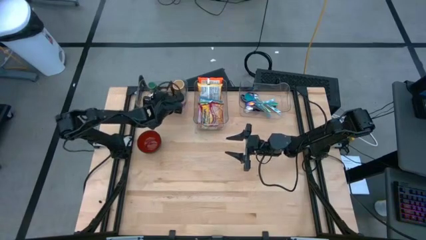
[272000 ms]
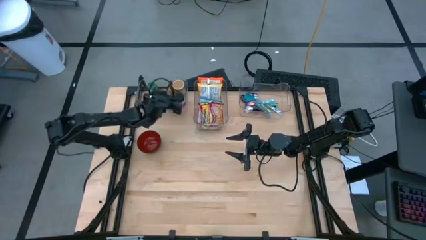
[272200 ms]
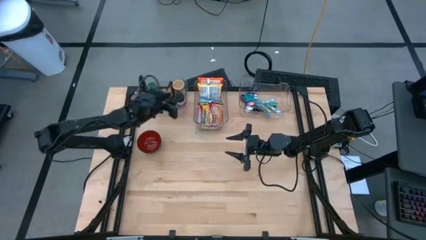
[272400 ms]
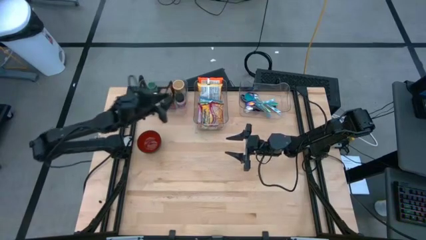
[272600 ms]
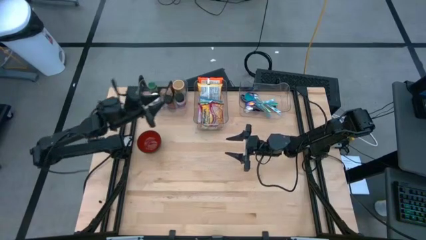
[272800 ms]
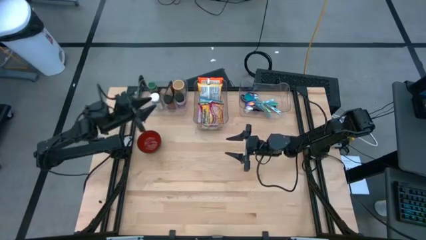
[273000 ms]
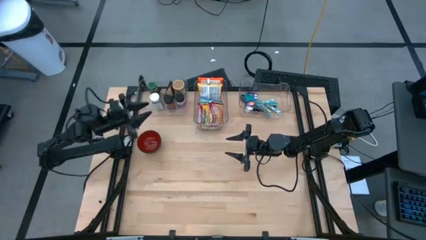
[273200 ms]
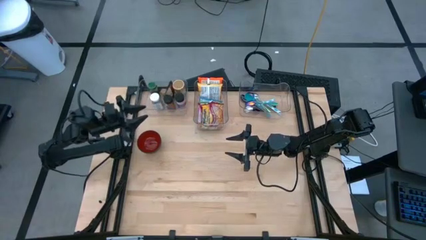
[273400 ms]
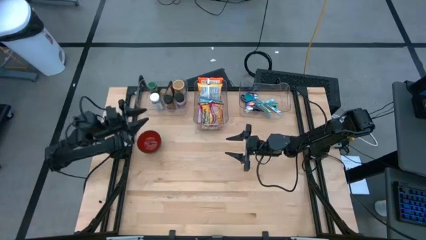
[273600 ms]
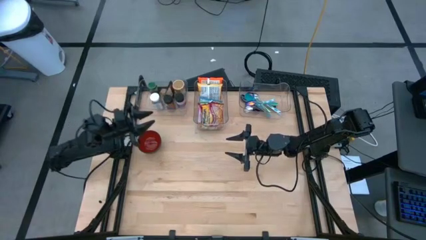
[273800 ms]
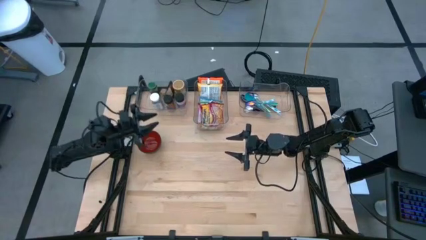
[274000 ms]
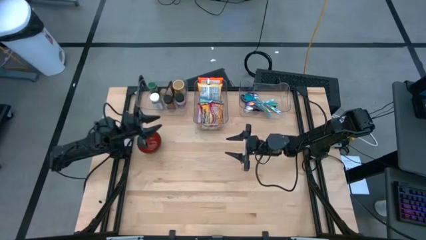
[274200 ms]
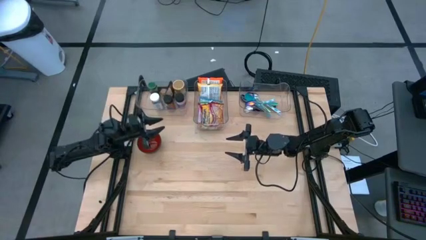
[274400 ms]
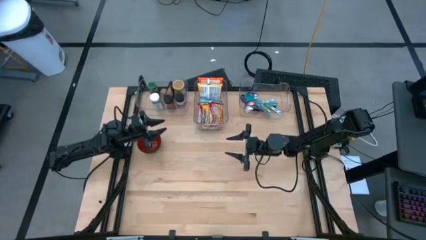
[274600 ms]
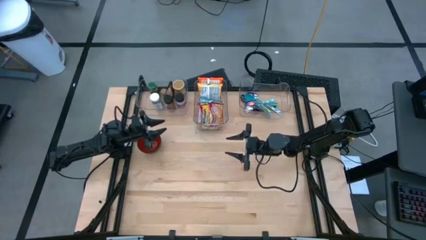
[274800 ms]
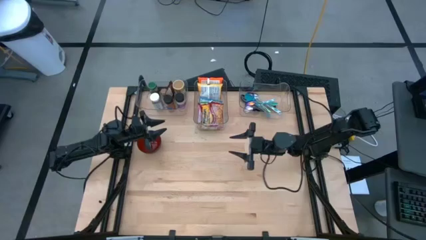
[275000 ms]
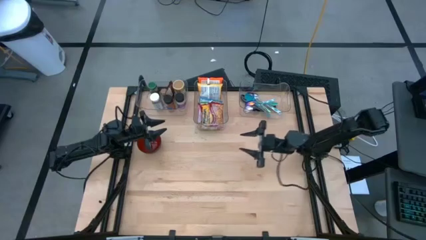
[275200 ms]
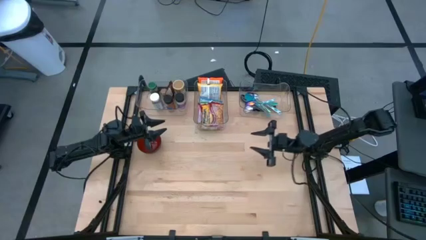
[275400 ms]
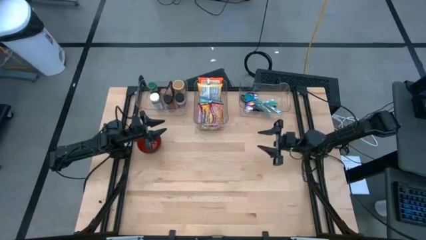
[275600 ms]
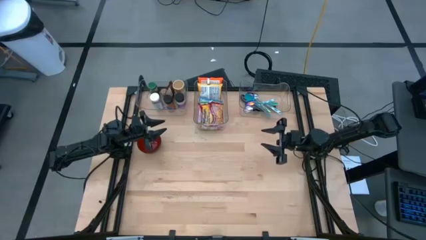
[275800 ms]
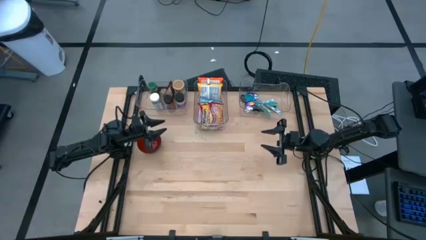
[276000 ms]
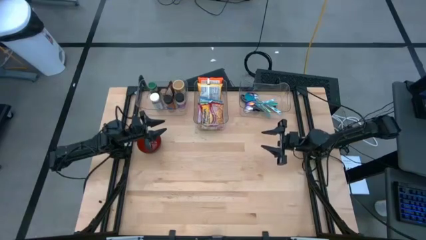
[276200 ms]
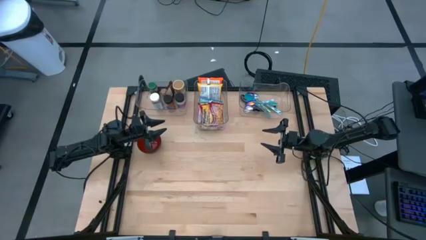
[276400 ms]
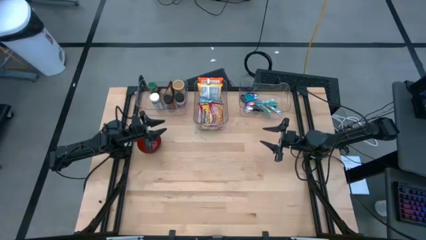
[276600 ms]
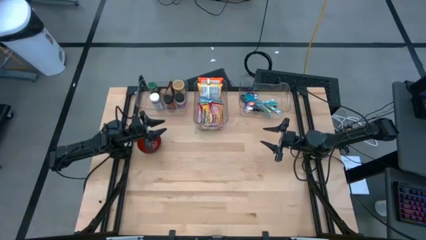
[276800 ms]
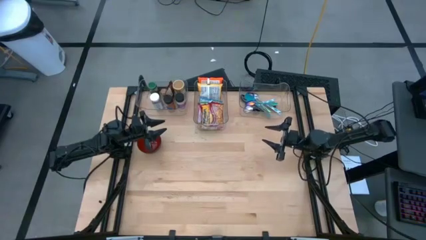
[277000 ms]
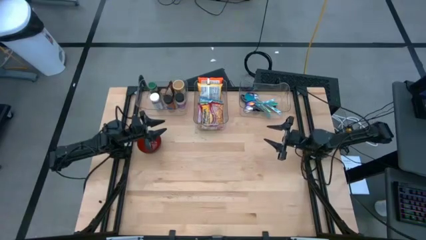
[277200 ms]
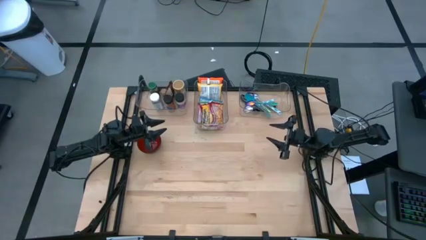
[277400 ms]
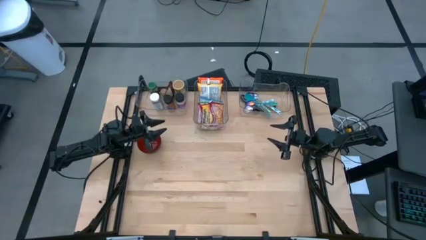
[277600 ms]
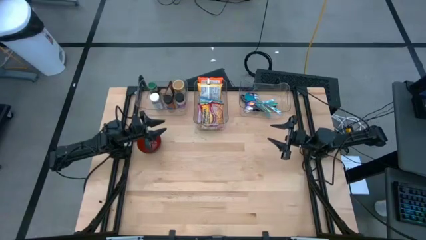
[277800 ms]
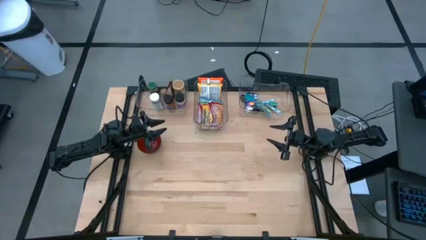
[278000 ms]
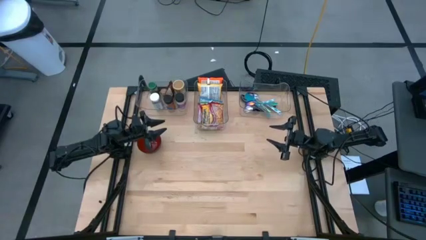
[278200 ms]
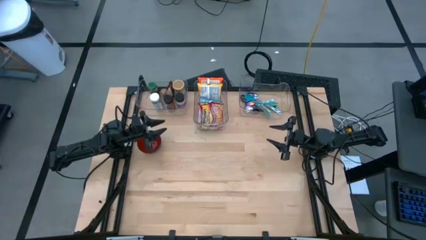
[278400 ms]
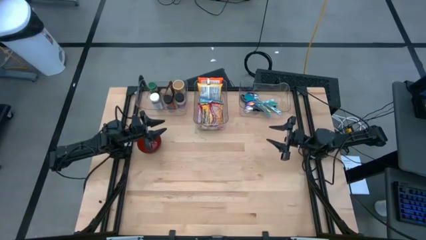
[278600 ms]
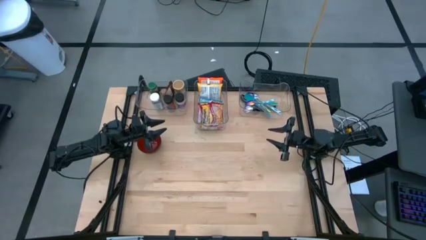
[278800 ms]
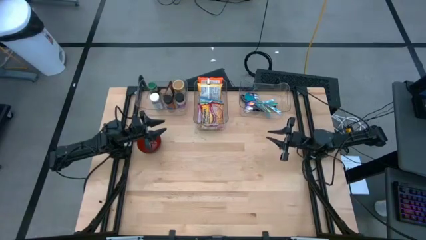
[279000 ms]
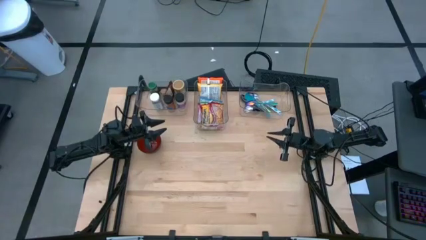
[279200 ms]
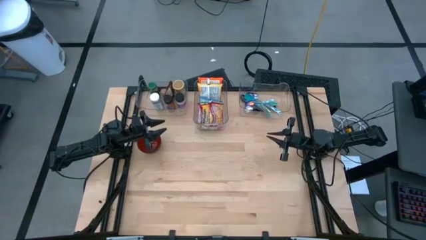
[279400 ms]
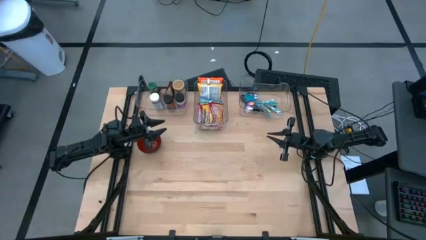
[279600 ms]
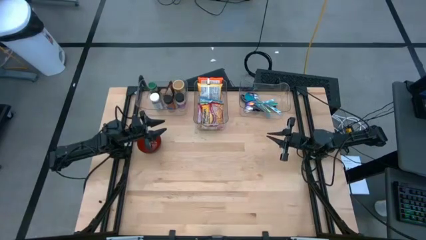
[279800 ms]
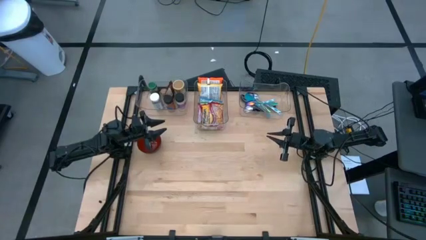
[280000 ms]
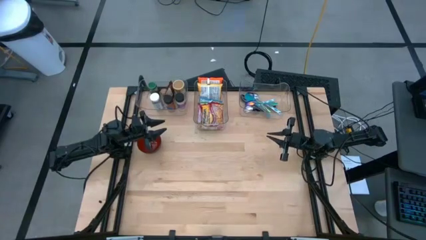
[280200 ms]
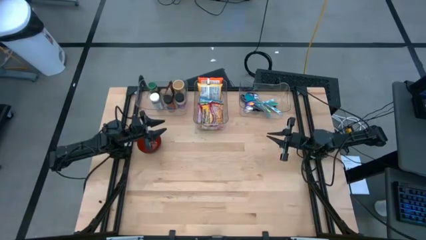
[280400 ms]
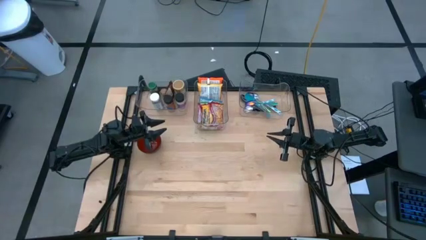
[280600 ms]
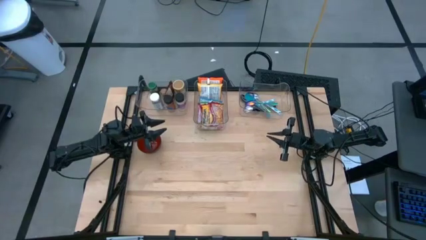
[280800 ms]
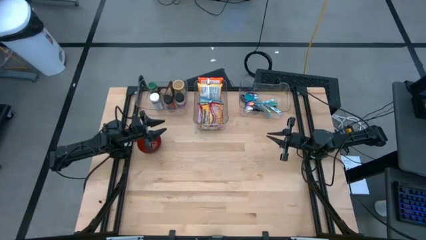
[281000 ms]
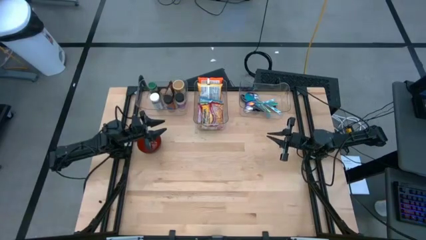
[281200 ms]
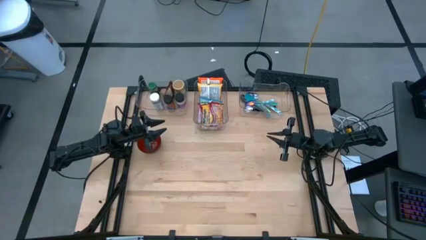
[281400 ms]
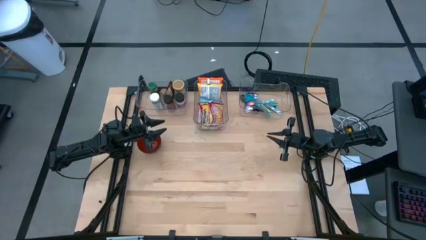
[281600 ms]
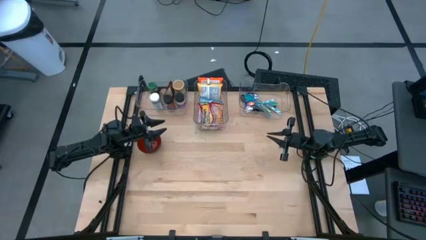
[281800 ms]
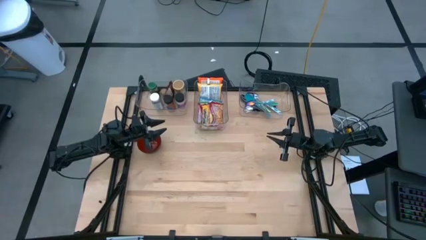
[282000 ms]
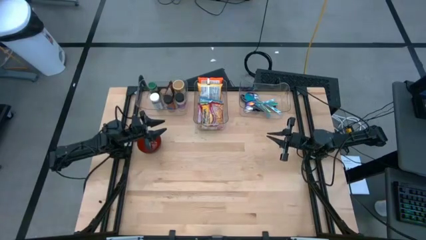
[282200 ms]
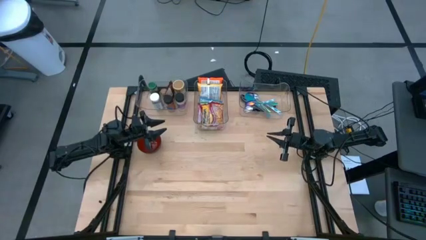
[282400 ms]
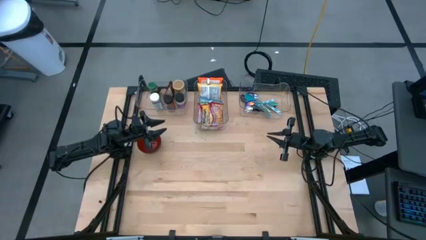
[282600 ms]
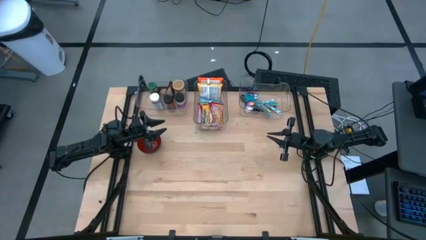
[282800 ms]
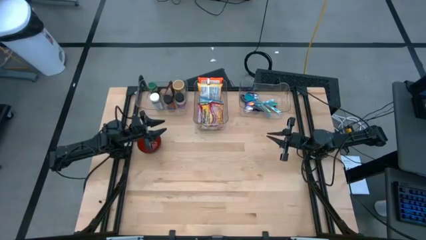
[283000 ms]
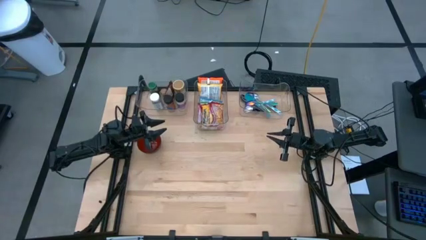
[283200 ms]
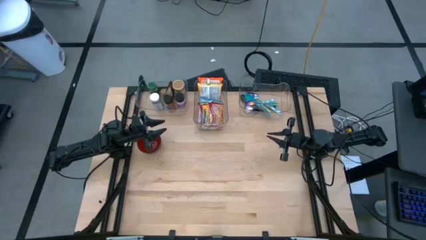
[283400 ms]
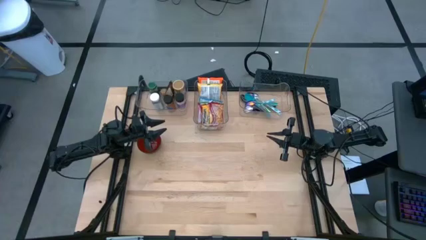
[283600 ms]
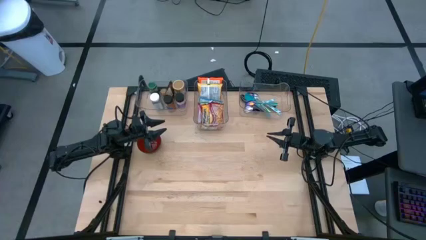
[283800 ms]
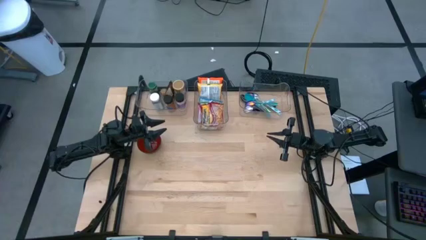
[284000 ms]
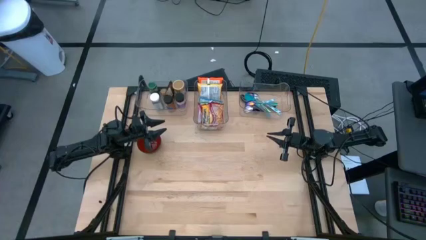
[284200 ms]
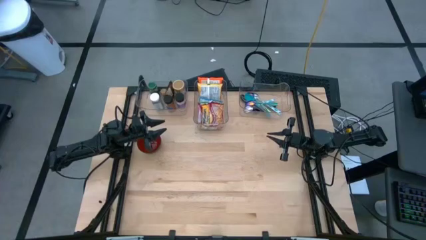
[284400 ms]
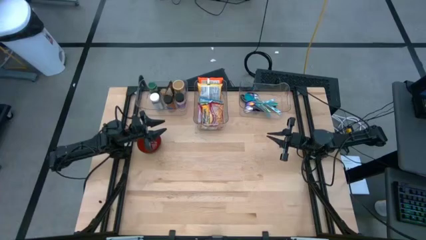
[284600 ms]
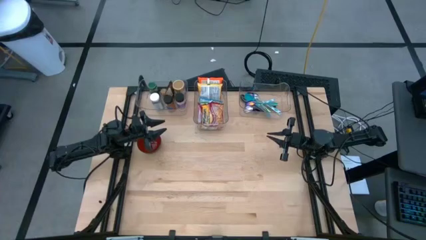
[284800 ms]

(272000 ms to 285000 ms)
Task: Pick & Place Food Item
Return to Home Position

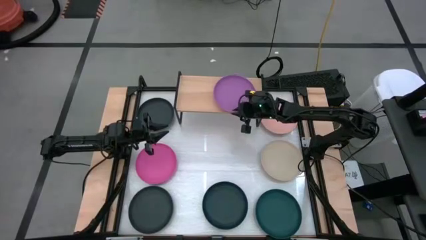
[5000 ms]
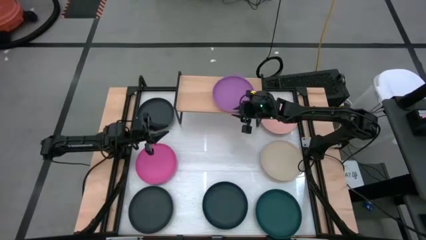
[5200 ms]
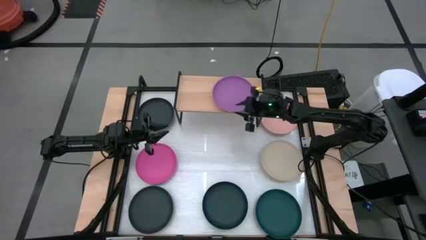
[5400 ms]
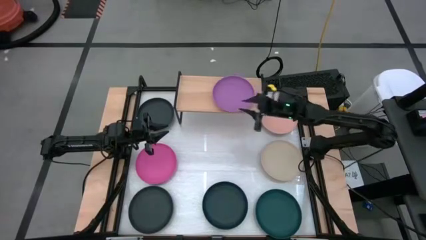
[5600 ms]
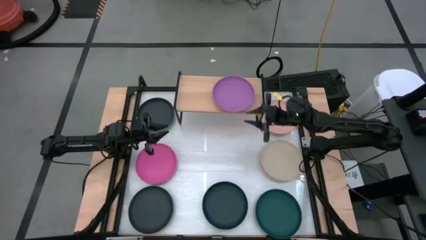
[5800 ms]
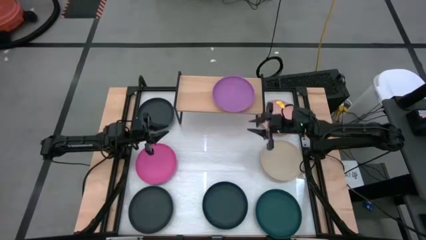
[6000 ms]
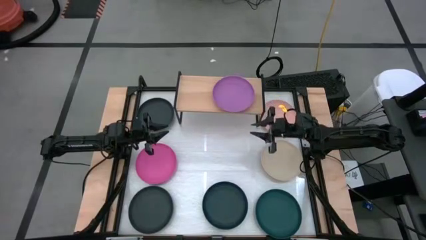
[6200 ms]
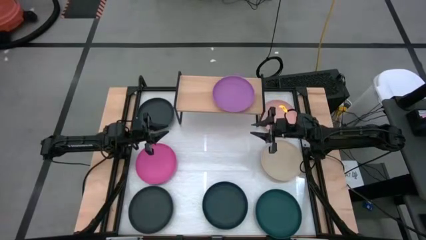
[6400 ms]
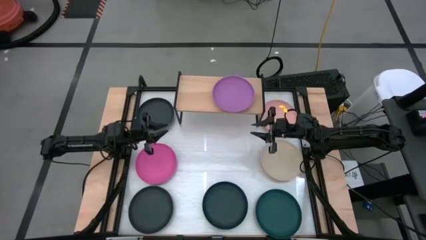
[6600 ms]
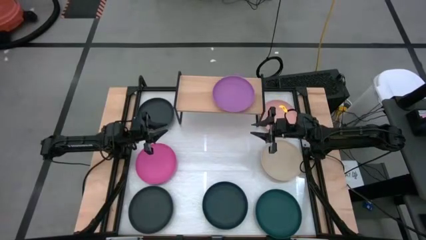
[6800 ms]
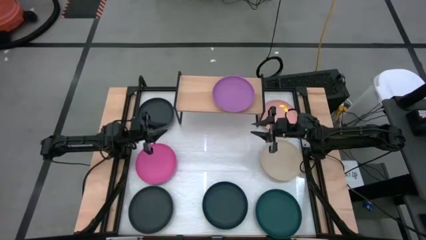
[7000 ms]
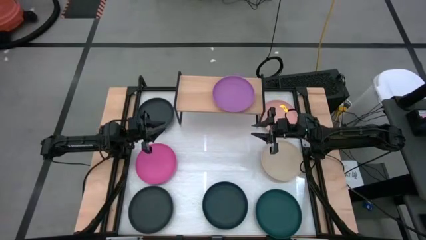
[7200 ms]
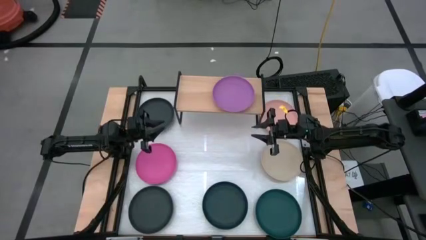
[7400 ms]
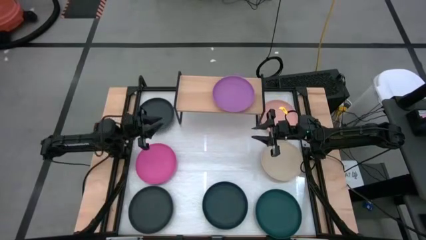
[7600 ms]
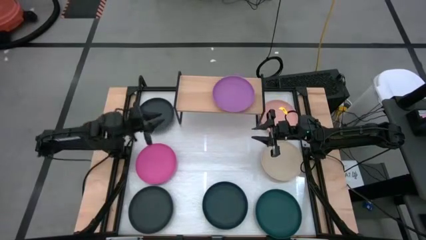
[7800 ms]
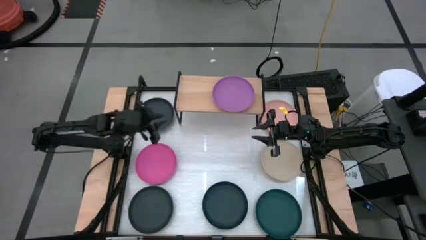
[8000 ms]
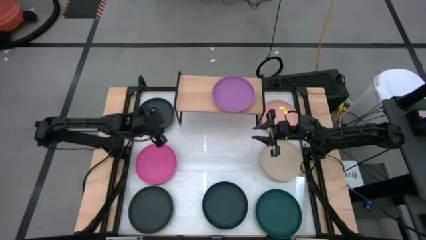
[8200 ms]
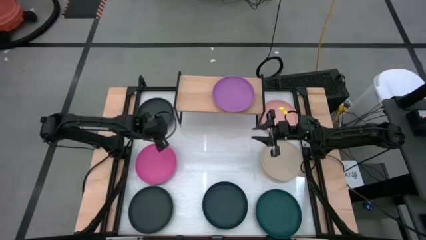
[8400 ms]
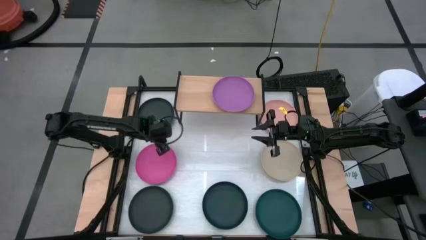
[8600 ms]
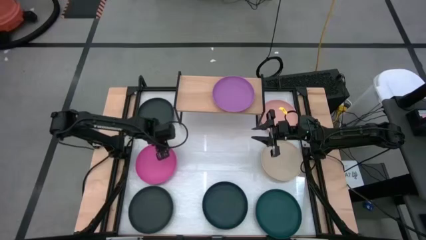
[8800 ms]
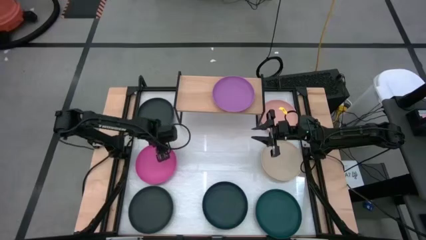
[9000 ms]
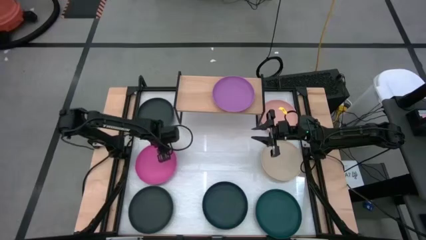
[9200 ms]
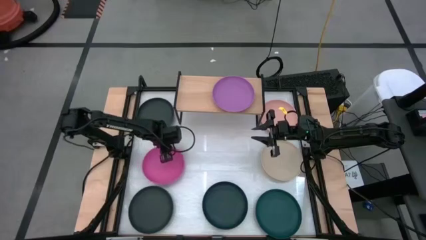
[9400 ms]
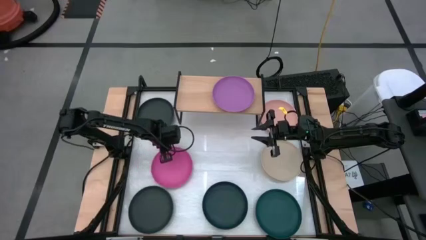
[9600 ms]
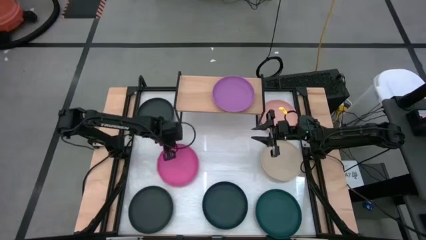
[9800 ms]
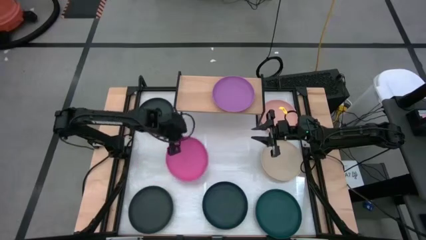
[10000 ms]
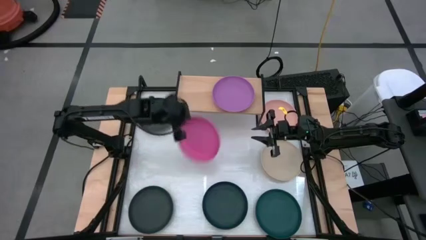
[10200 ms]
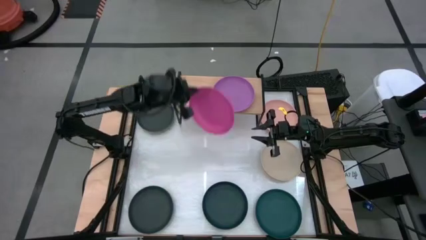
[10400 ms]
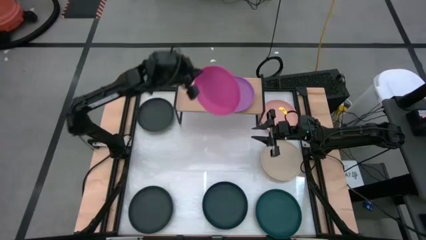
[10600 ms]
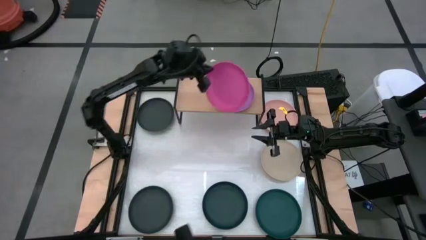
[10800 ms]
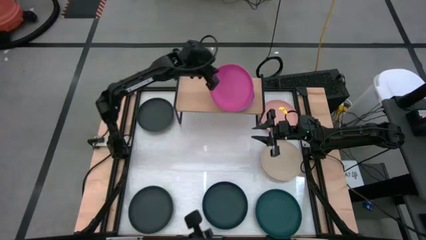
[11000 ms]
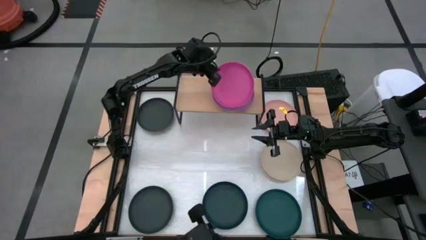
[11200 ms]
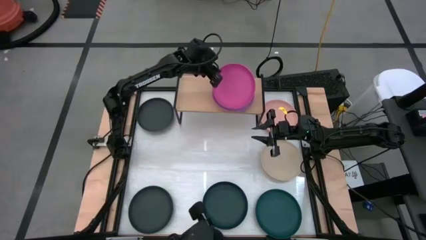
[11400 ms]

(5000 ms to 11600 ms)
Task: Place and stack plates onto a shelf
Stack the pink plate on top of the purple plate on the shelf
